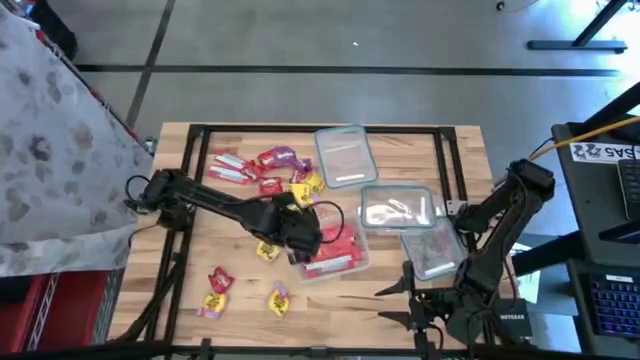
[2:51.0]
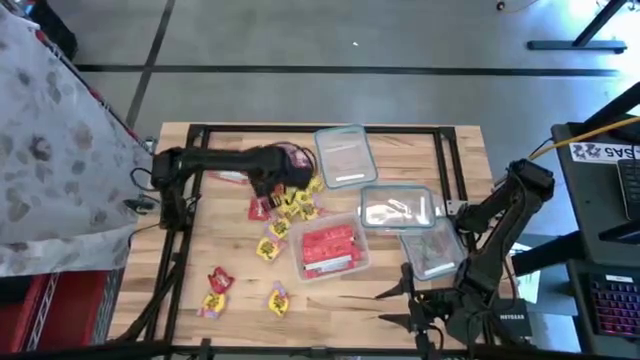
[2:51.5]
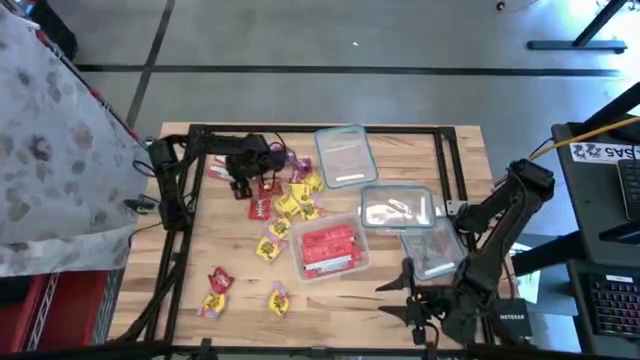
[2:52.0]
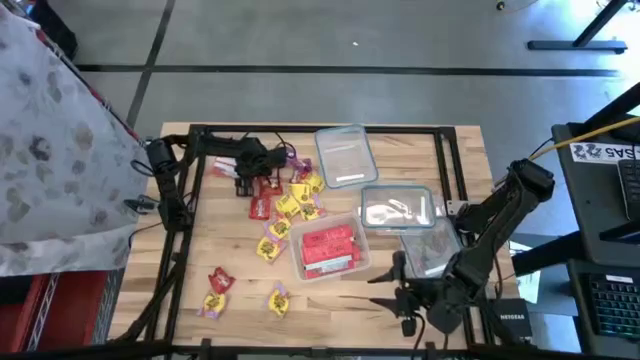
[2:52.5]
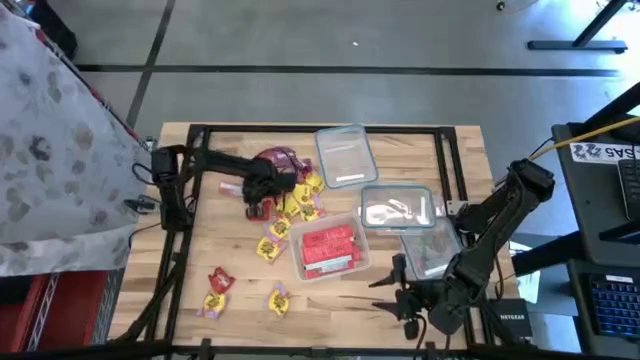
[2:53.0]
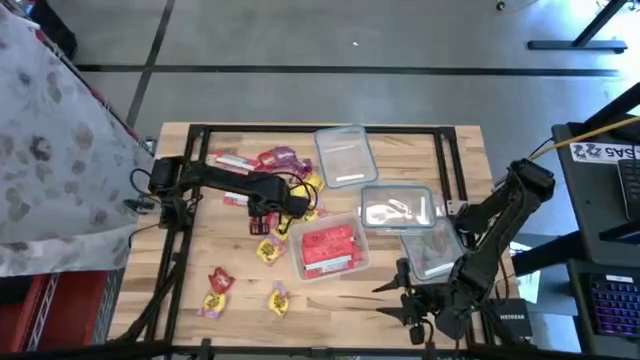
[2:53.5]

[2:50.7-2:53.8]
Task: Sort candy
Put the pink candy into the top rectangular transparent food container

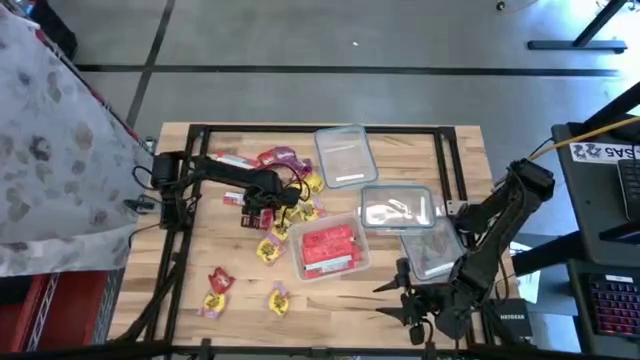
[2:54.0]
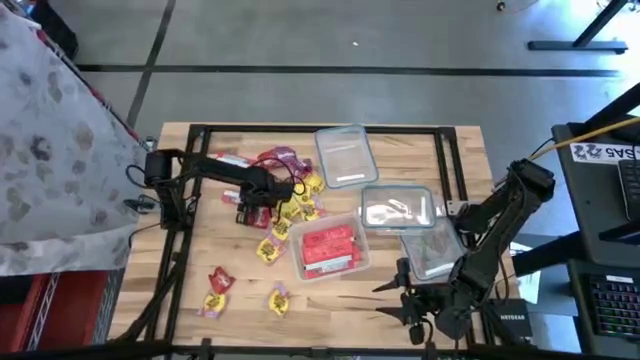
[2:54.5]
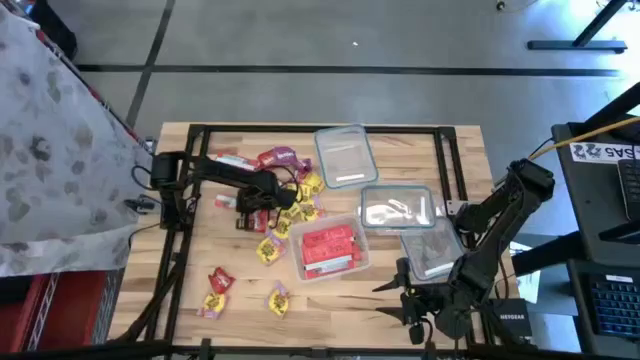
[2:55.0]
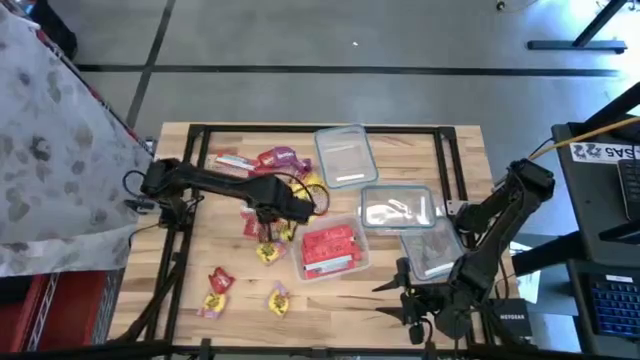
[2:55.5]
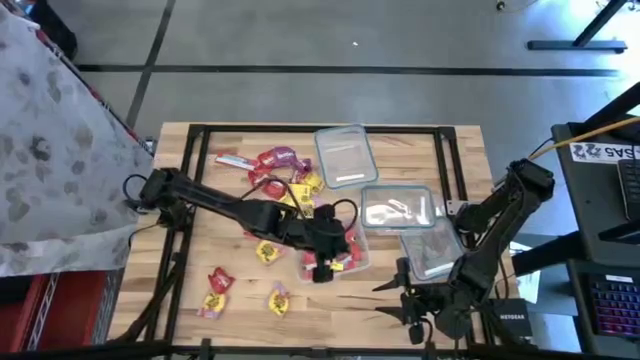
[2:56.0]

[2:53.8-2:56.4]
Put the pink candy into the top rectangular transparent food container

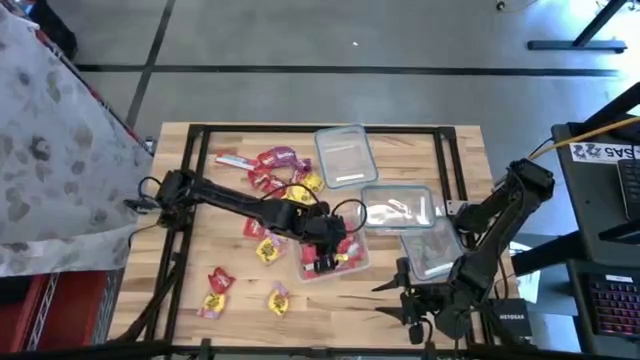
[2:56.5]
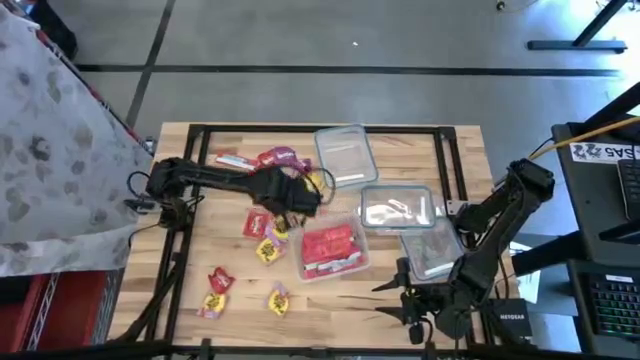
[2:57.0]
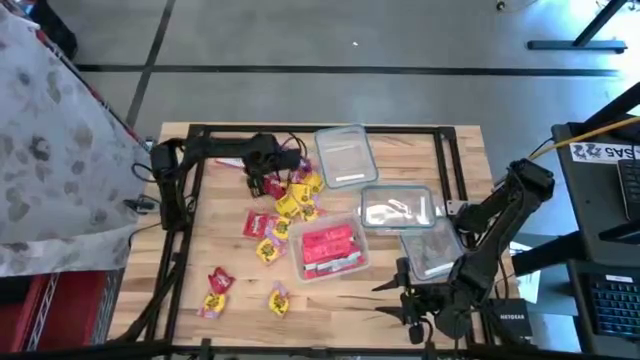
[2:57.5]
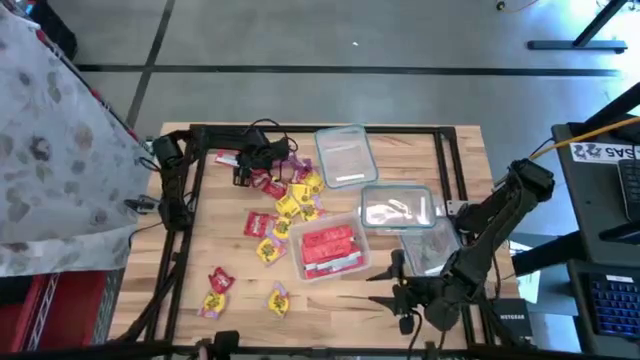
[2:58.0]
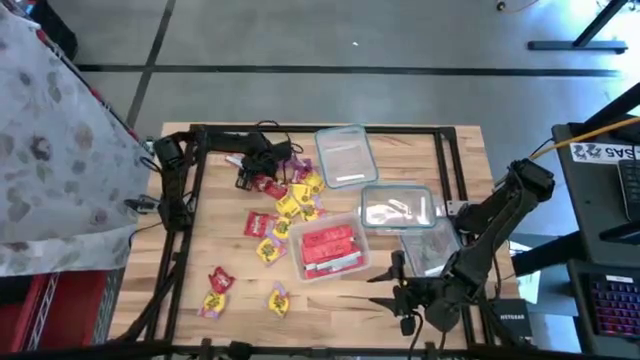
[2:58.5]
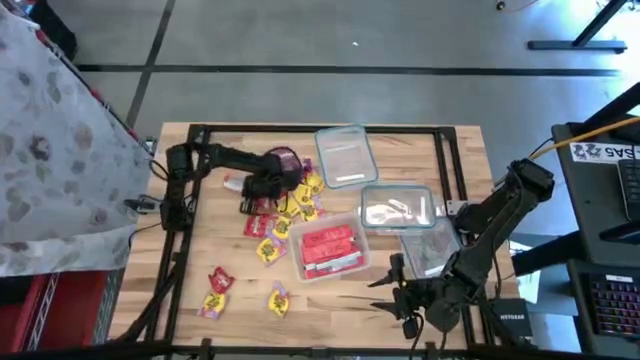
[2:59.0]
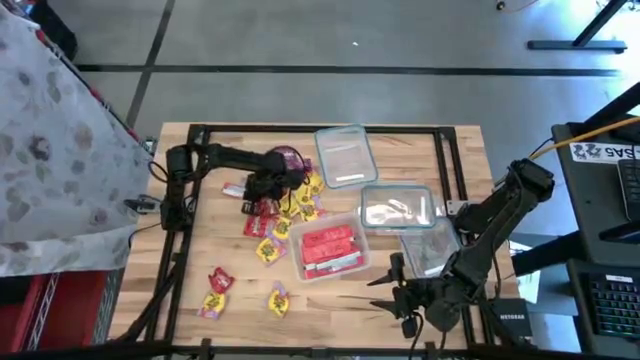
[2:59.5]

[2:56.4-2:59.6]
Put the pink candy into the top rectangular transparent food container

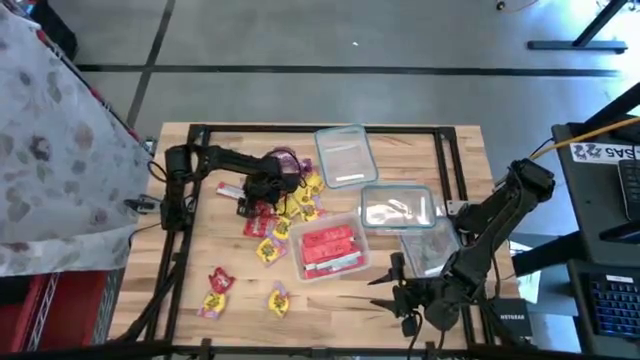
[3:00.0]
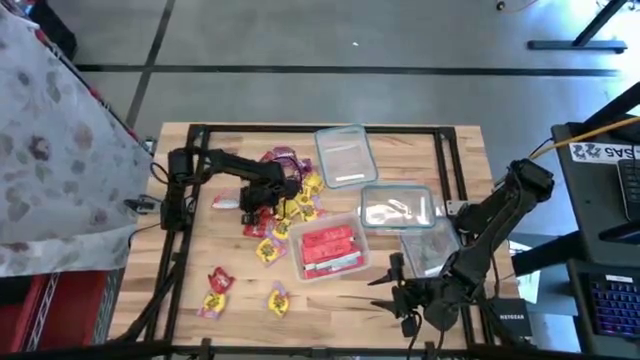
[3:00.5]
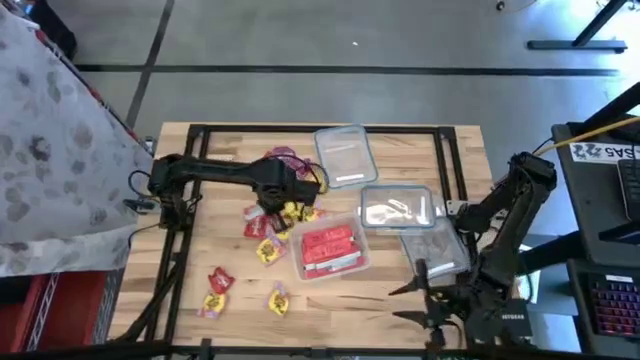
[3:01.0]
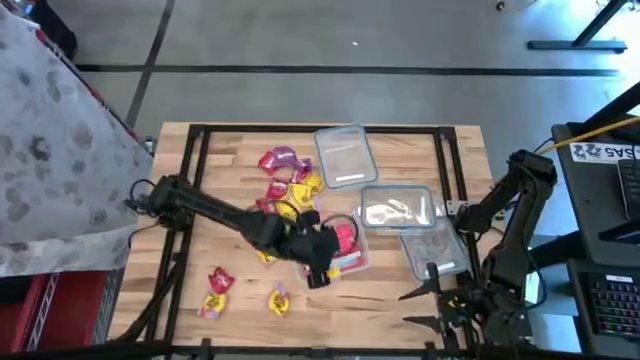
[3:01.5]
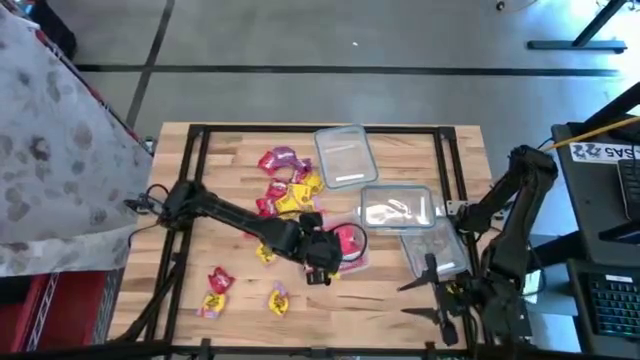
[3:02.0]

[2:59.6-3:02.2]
Put the pink candy into the top rectangular transparent food container

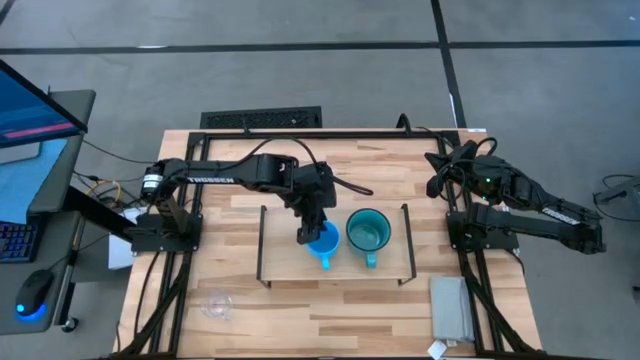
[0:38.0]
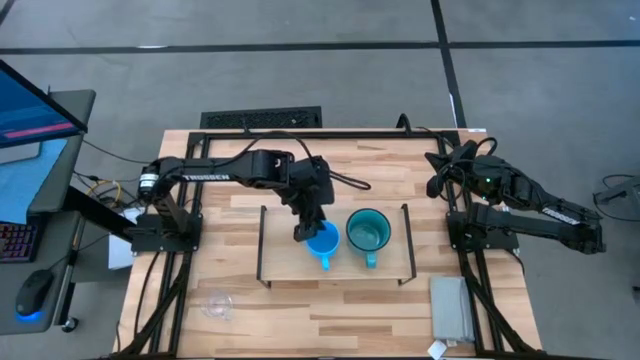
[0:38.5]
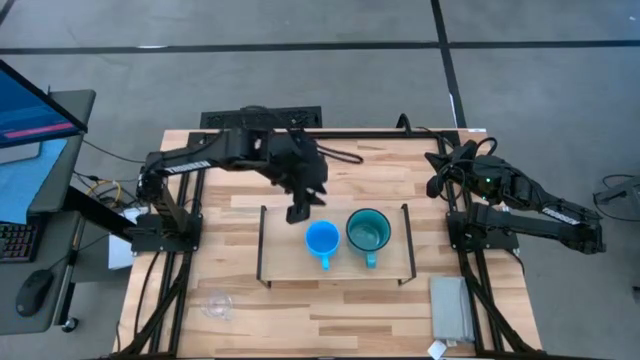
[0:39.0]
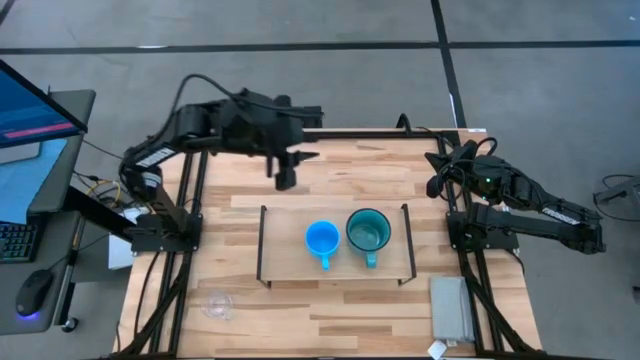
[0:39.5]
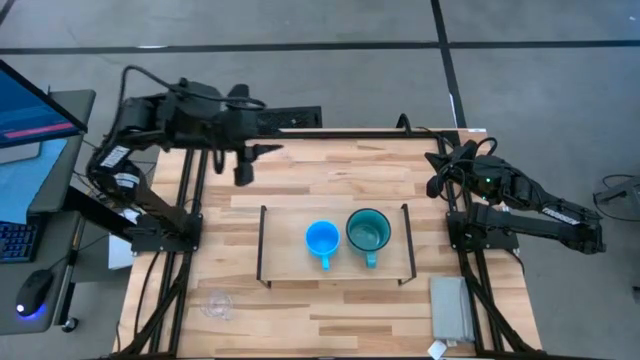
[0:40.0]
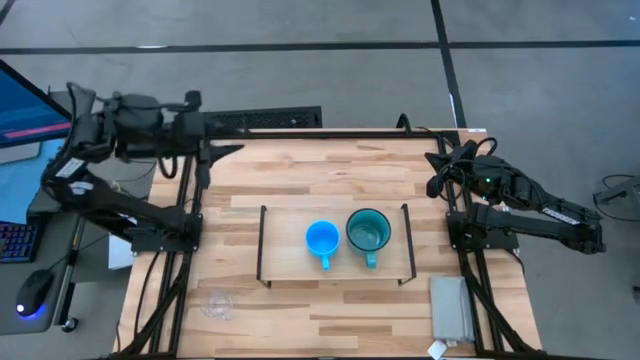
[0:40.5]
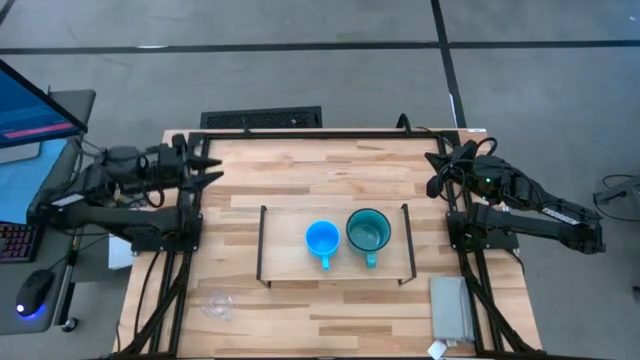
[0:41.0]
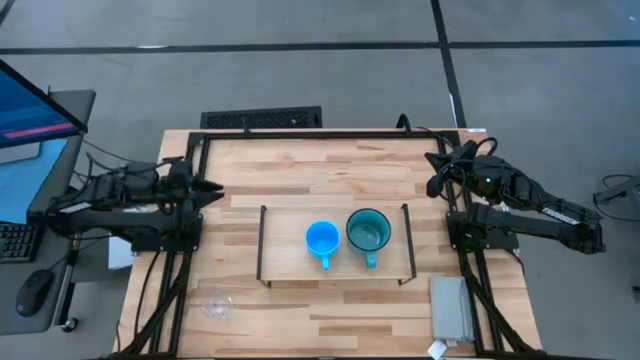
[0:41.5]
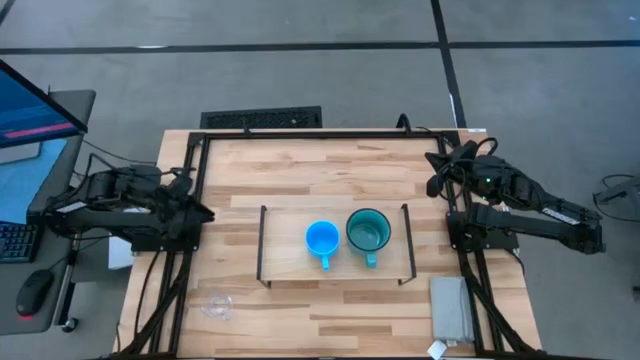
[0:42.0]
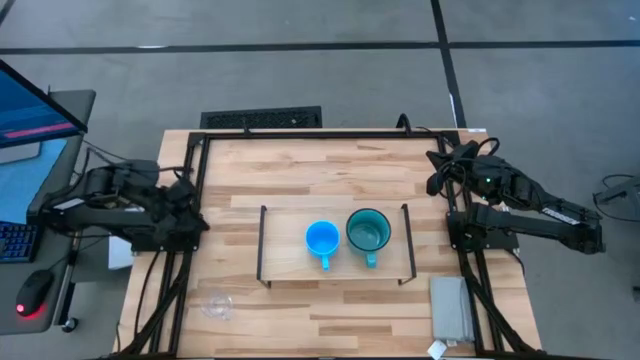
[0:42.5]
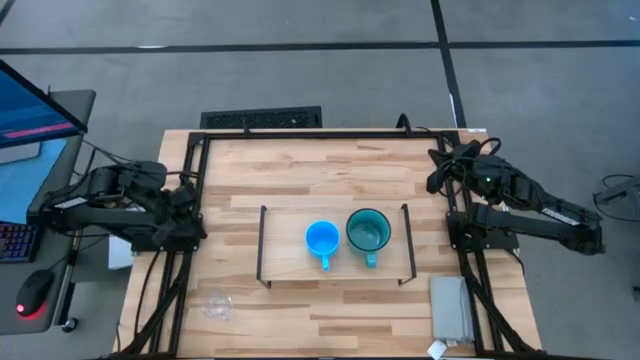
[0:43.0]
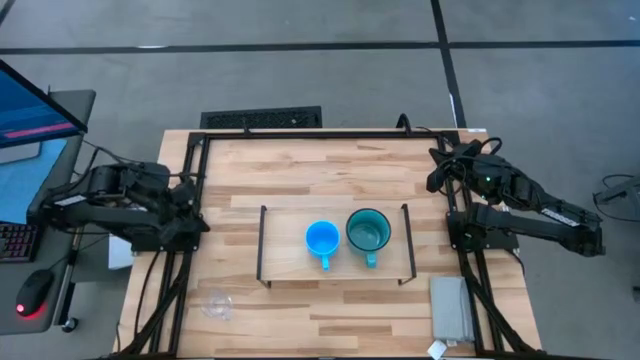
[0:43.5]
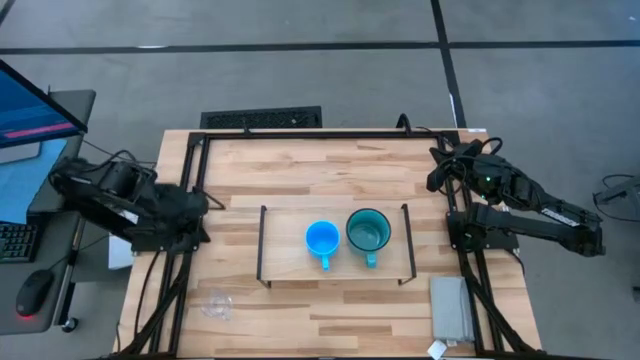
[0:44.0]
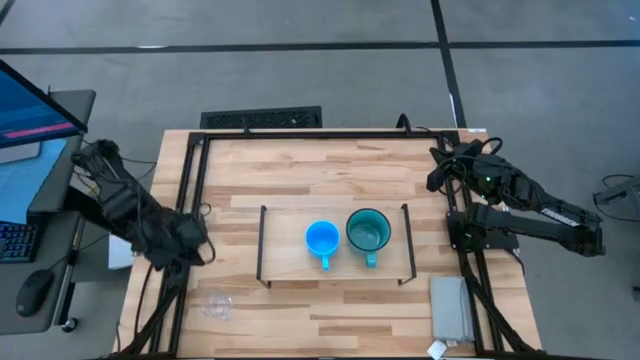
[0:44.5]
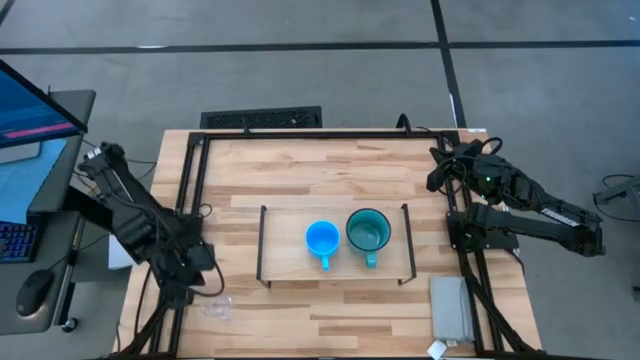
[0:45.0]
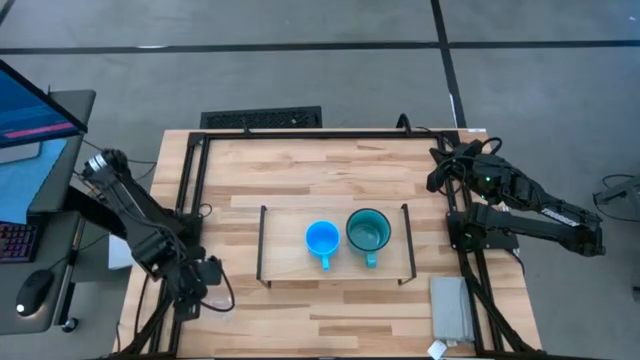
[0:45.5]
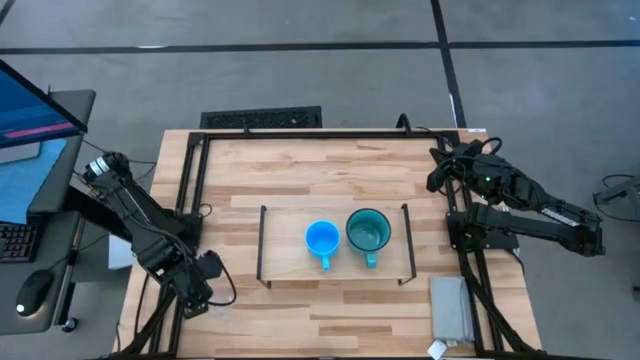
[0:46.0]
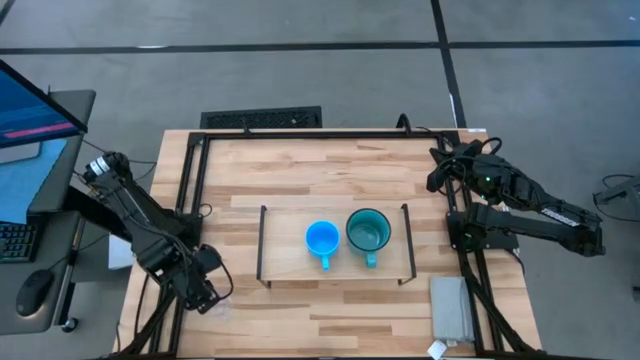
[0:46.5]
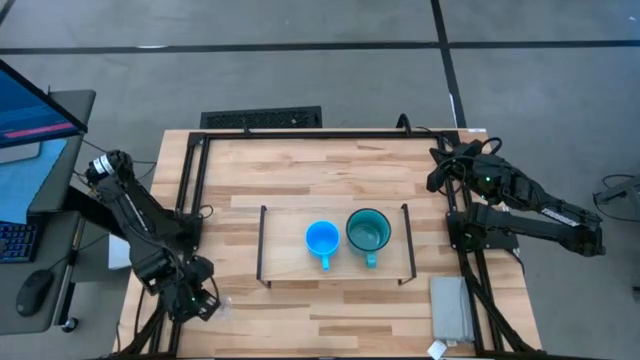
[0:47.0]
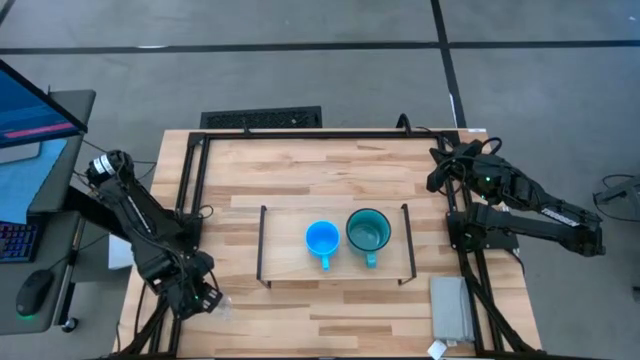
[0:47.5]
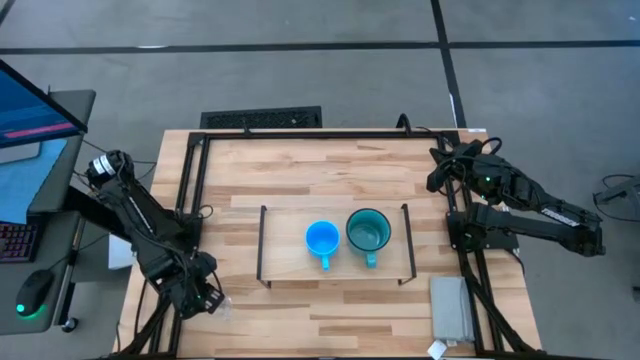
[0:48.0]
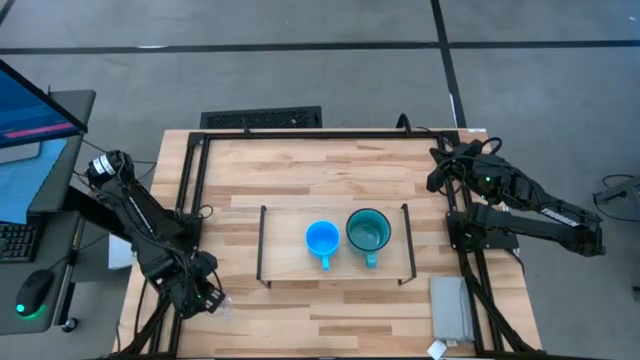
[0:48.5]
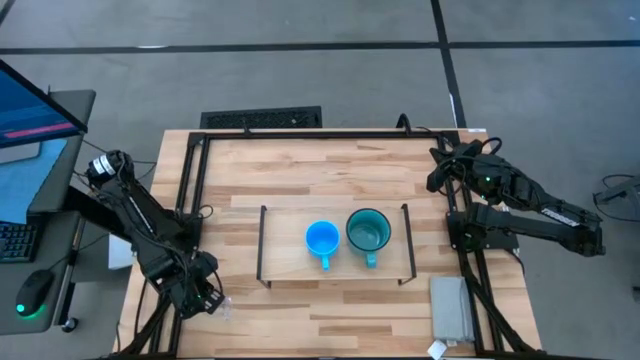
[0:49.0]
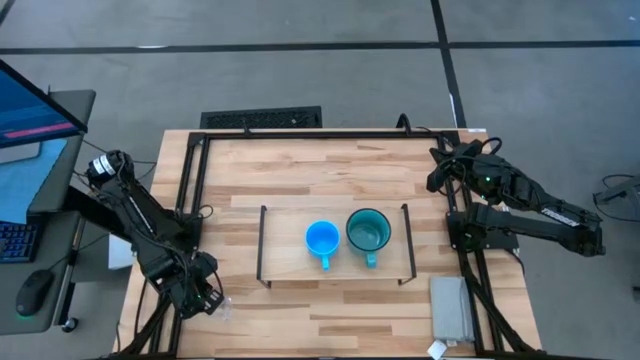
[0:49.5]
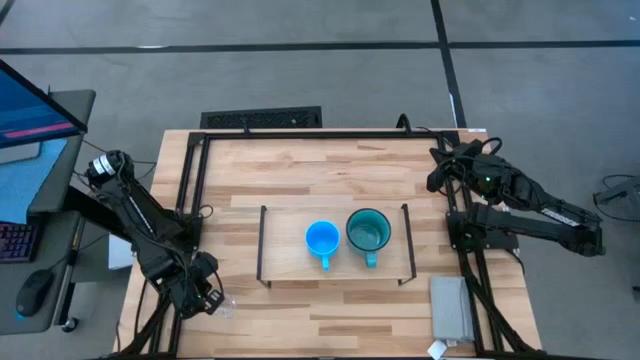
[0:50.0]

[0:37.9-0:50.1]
Task: Stack small to large cups/mugs on shelf
Put the transparent mug on the shelf
